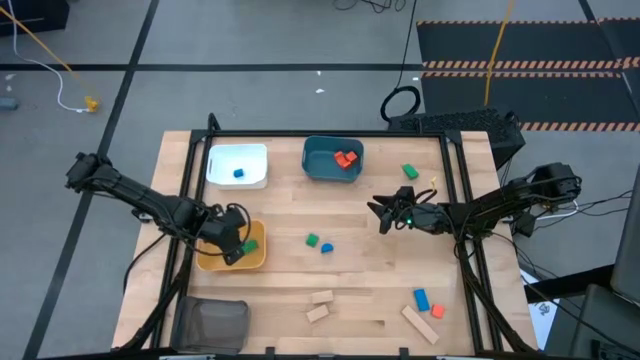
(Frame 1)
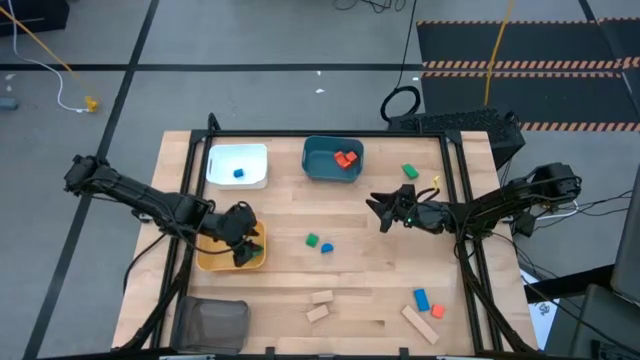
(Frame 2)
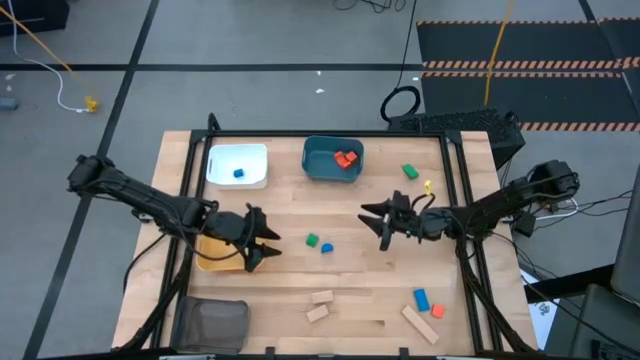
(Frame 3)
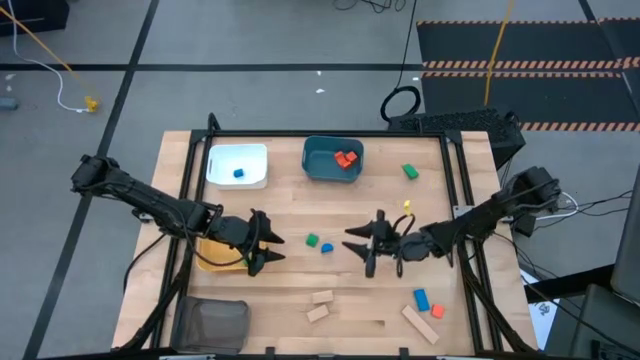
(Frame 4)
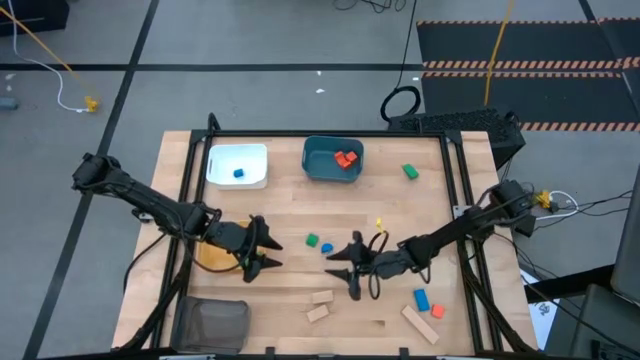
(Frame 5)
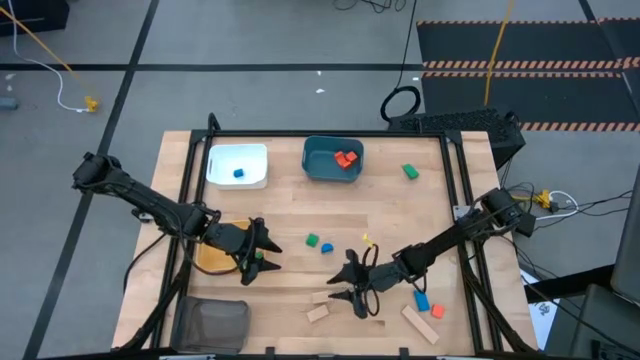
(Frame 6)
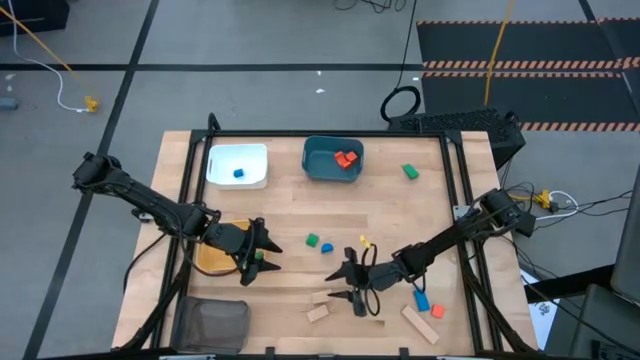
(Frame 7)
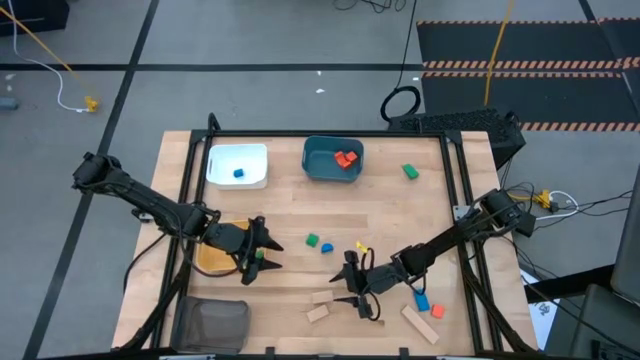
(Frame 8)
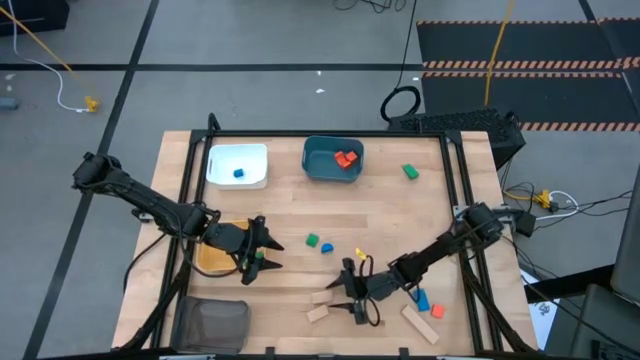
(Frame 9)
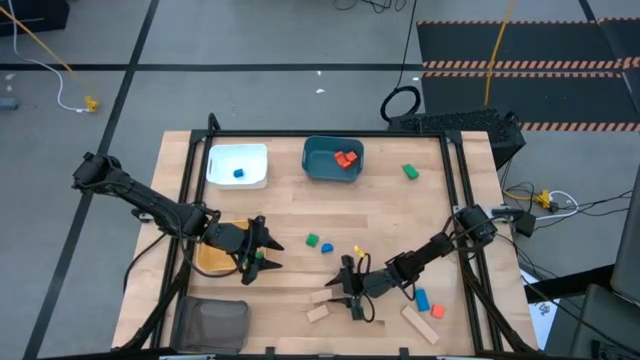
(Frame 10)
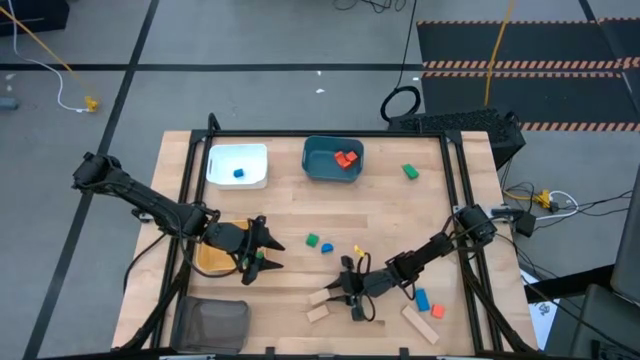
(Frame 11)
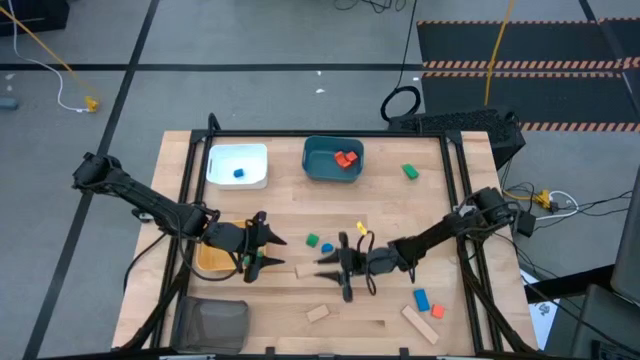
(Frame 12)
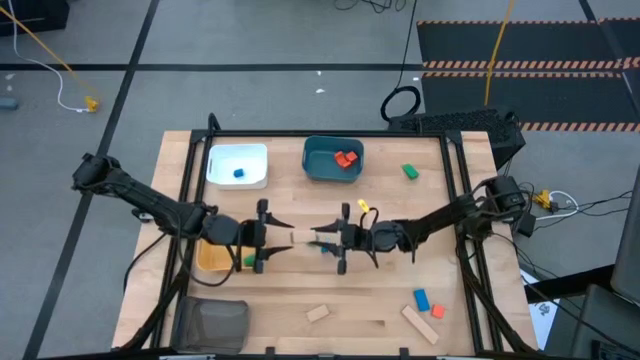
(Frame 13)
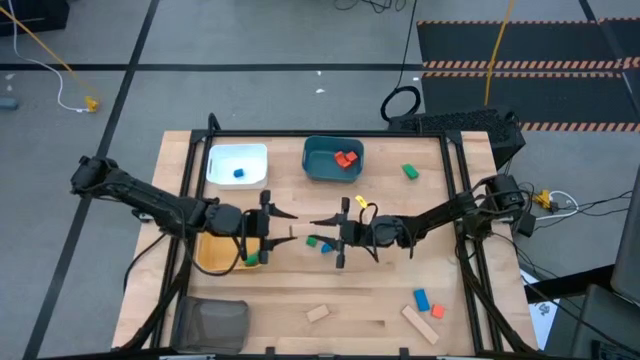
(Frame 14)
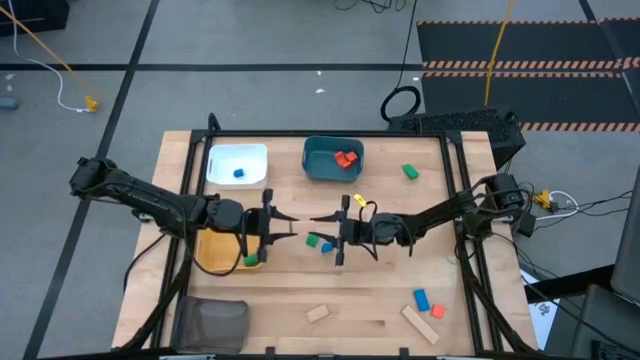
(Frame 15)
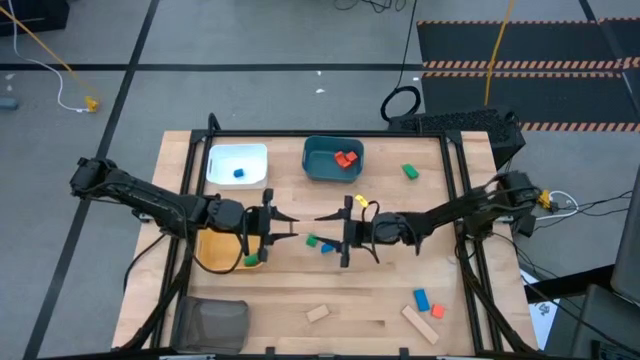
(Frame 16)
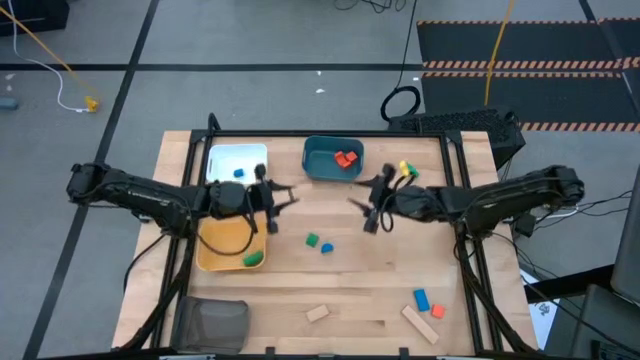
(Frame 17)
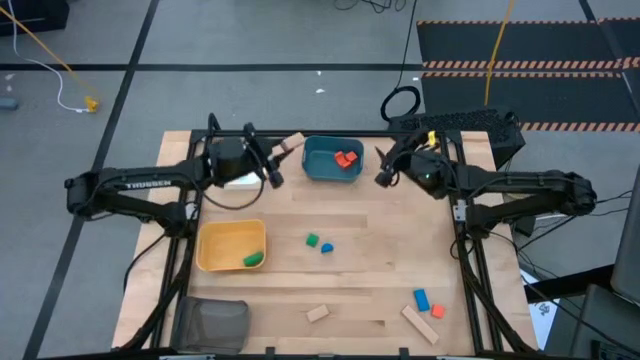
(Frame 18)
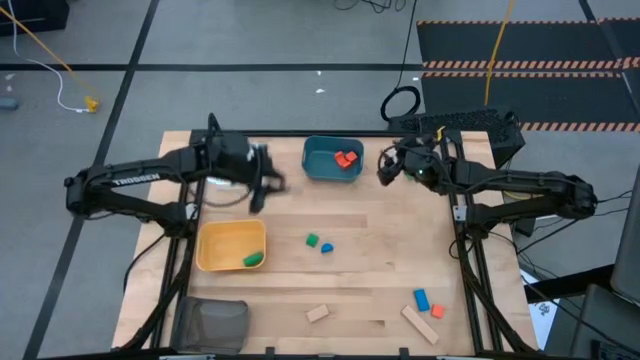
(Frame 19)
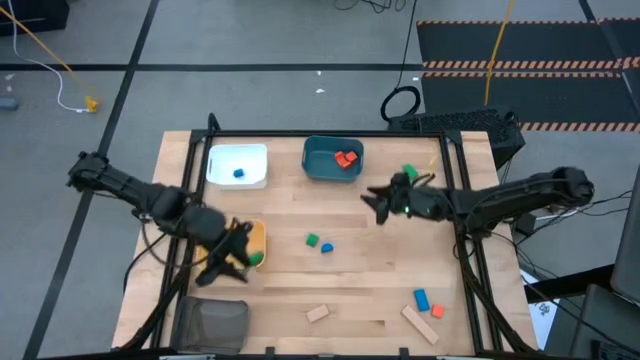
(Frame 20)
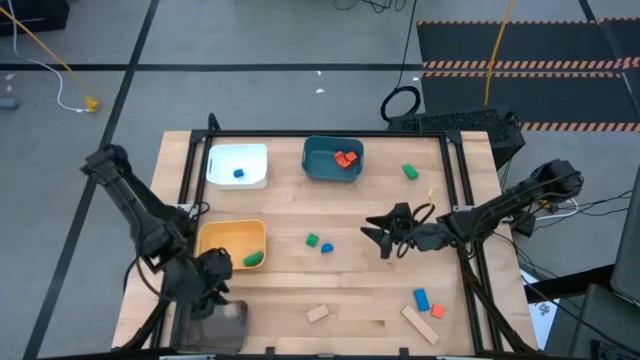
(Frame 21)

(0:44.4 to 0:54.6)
Task: Sort & place blocks by color
Put the top left brown wooden block into the black bin

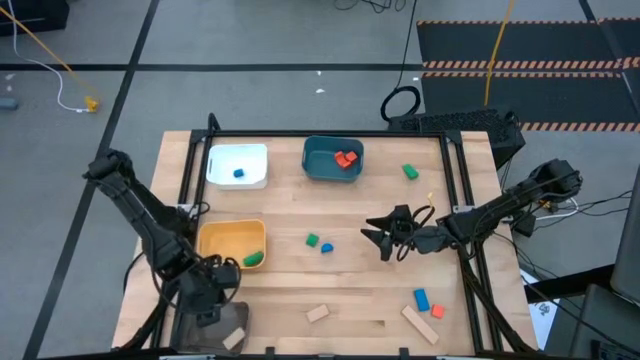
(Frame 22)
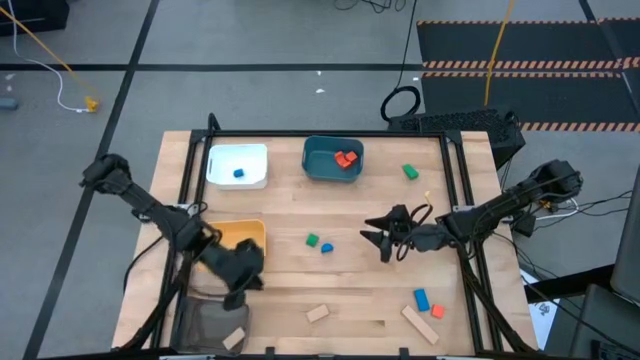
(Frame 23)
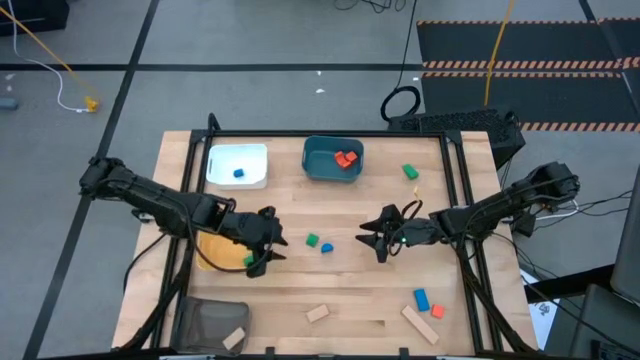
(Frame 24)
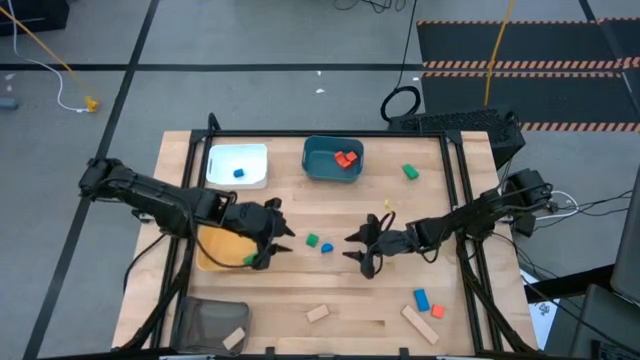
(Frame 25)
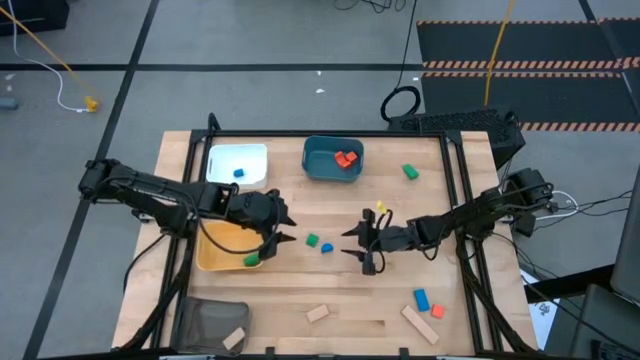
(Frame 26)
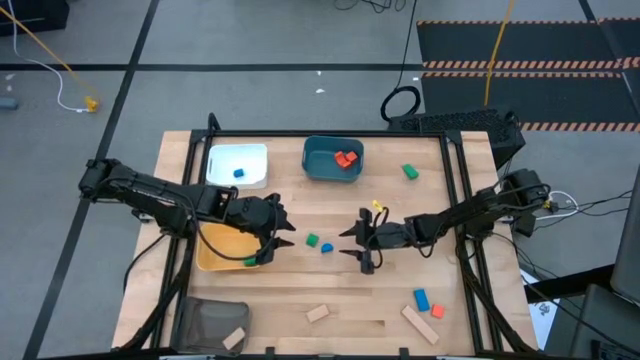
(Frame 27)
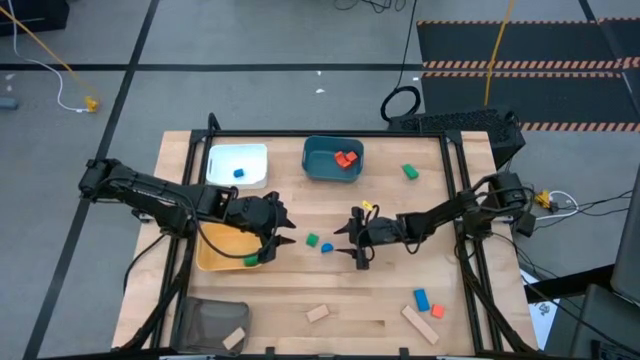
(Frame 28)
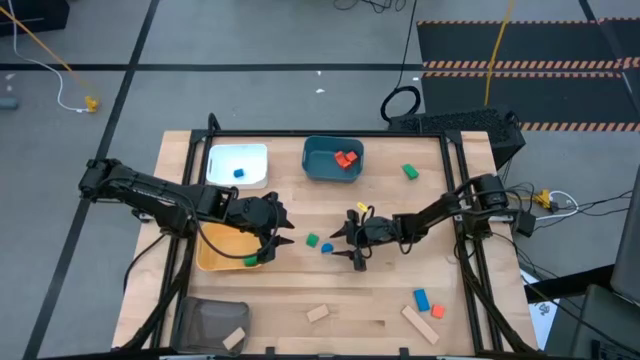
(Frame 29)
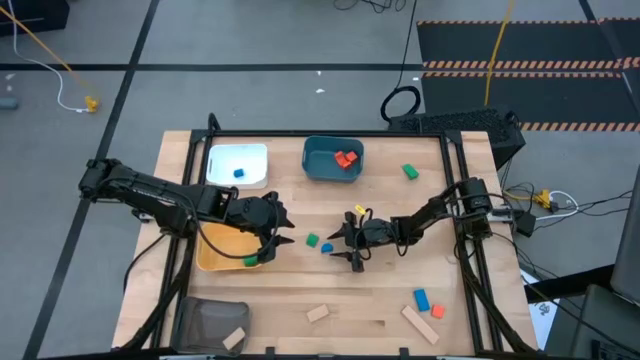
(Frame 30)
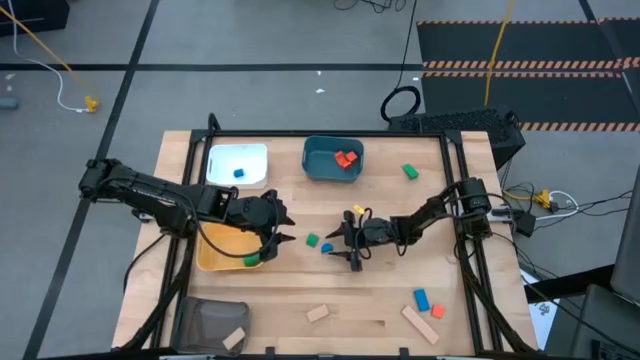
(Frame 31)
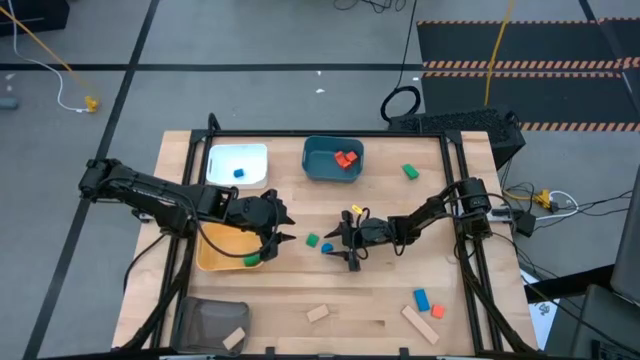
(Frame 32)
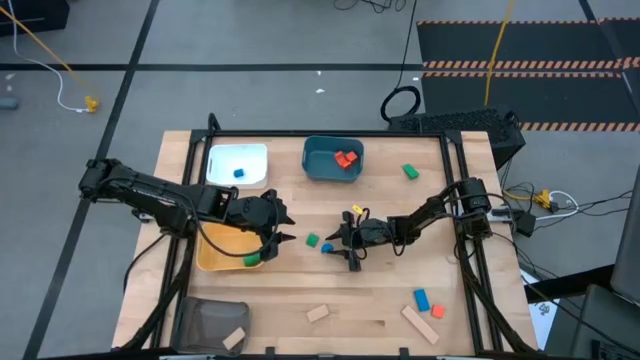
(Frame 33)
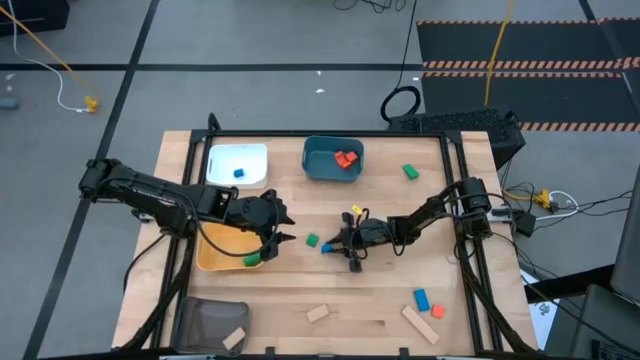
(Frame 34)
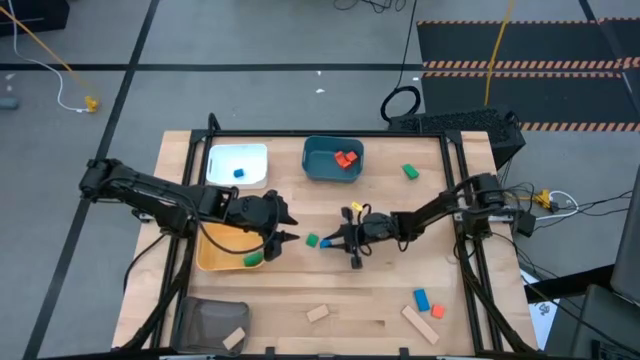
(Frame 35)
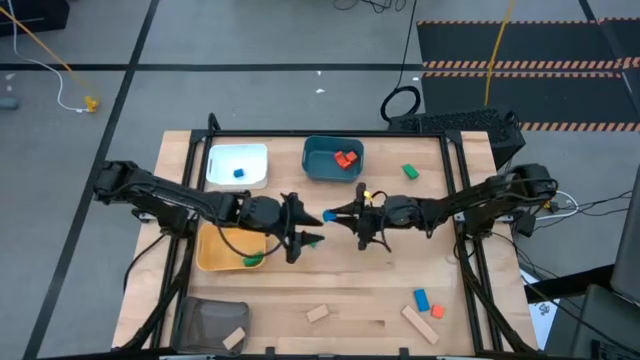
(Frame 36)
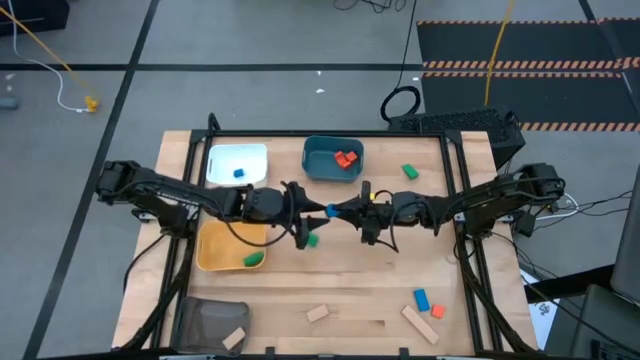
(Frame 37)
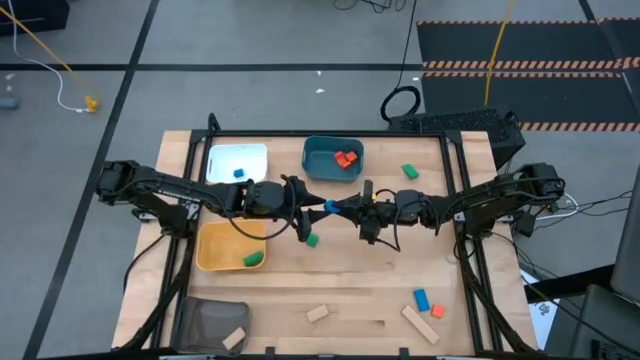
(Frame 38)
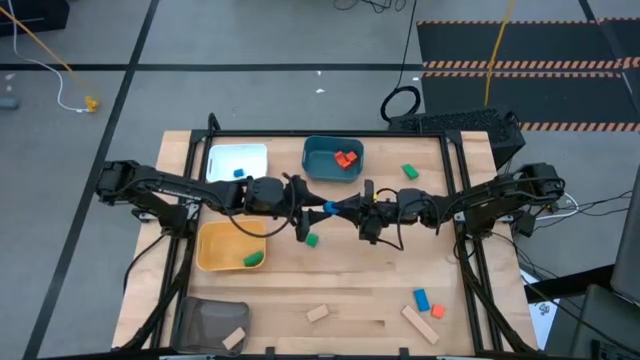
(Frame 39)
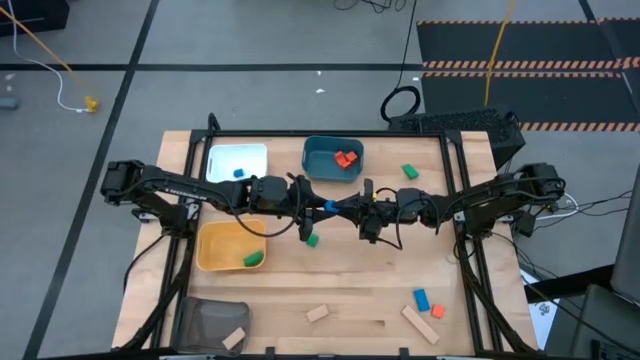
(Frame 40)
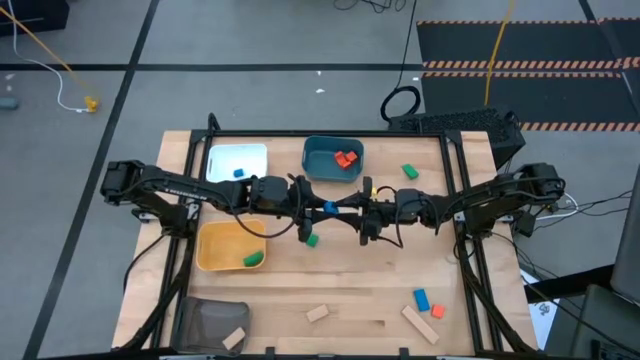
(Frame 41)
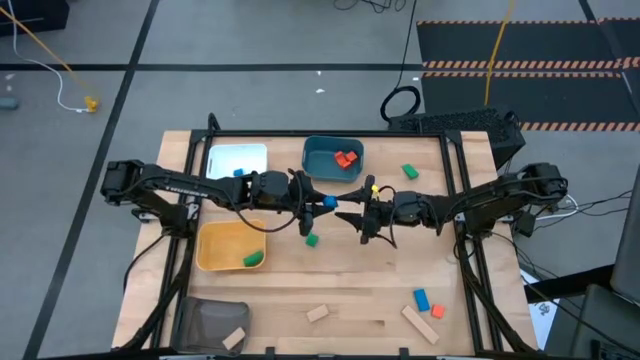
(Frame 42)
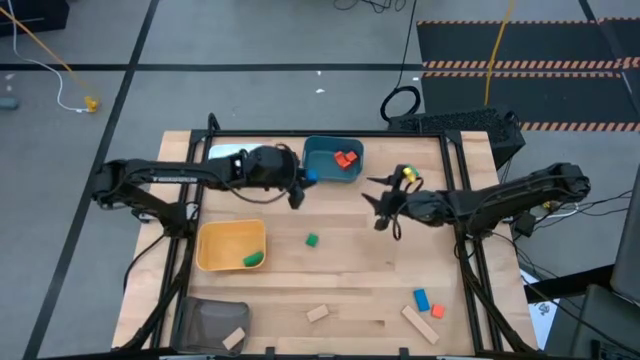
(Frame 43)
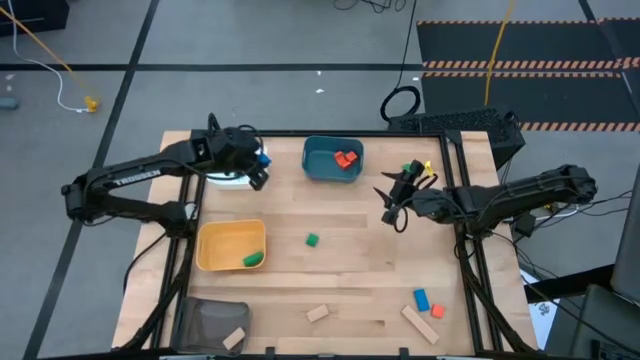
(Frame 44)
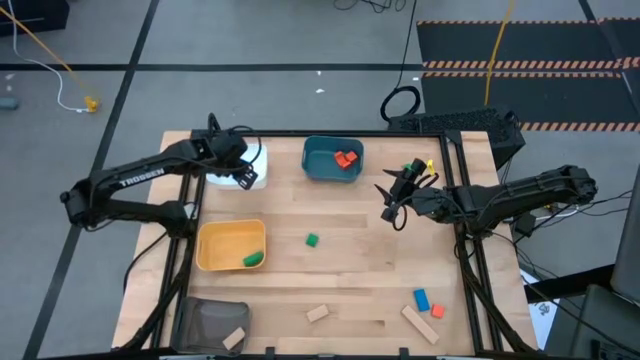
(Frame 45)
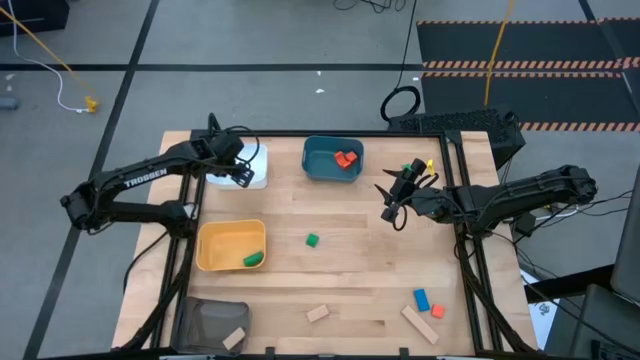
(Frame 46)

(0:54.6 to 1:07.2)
Put the top blue wooden block into the white bin
